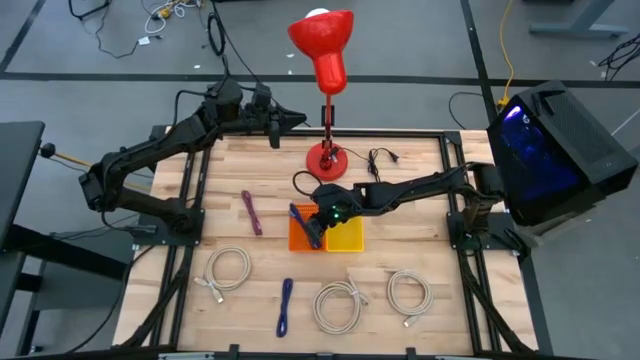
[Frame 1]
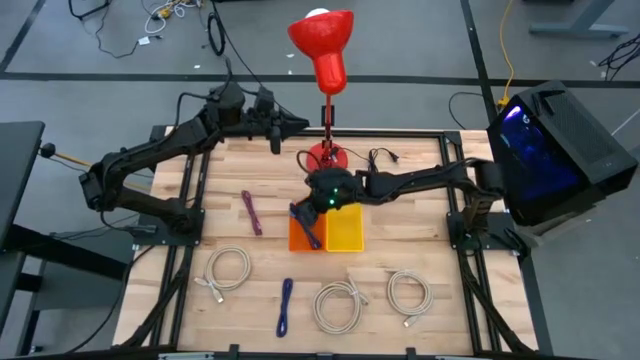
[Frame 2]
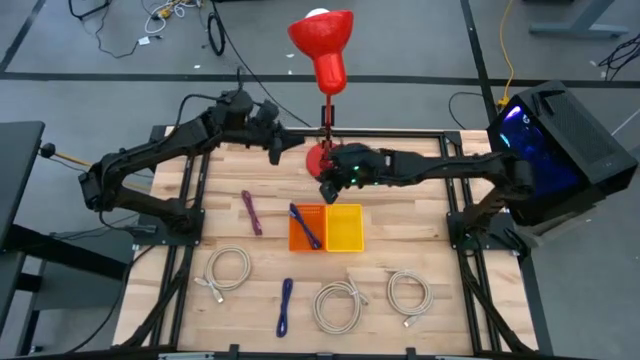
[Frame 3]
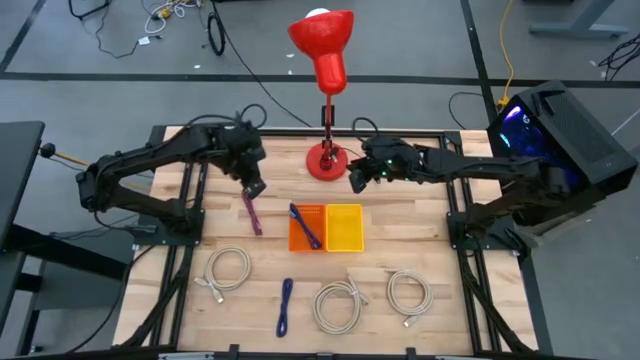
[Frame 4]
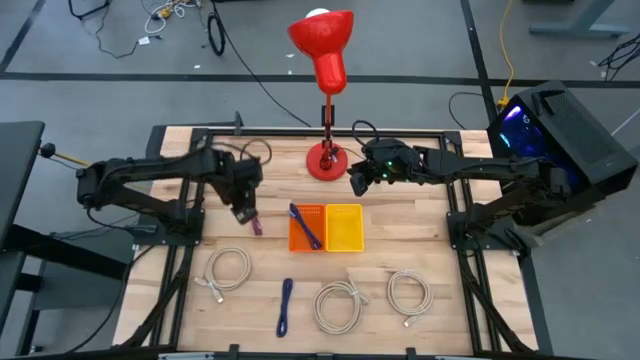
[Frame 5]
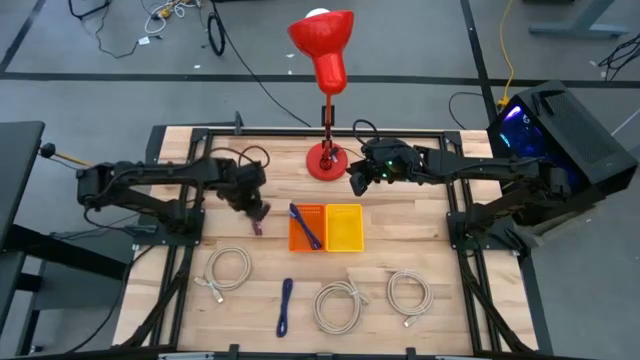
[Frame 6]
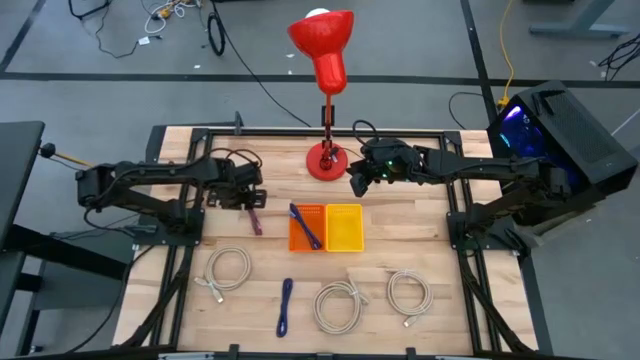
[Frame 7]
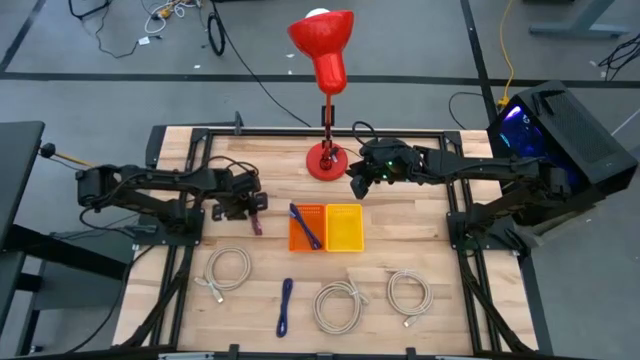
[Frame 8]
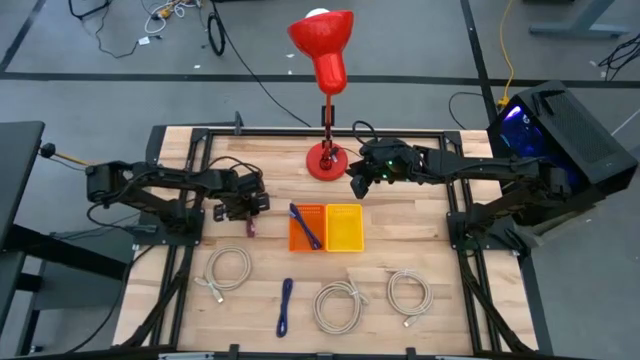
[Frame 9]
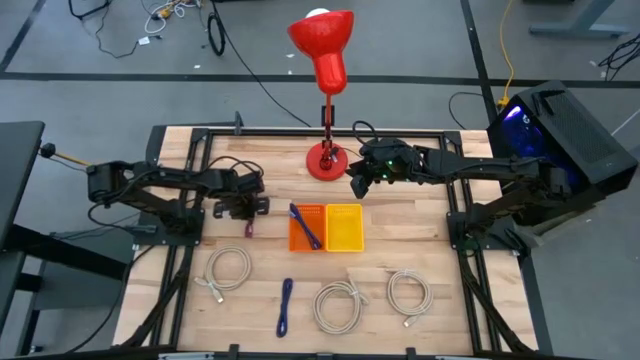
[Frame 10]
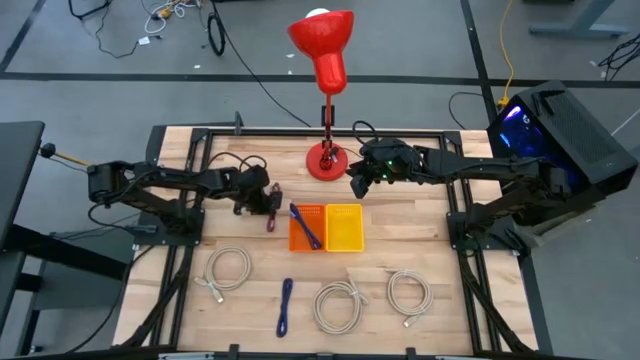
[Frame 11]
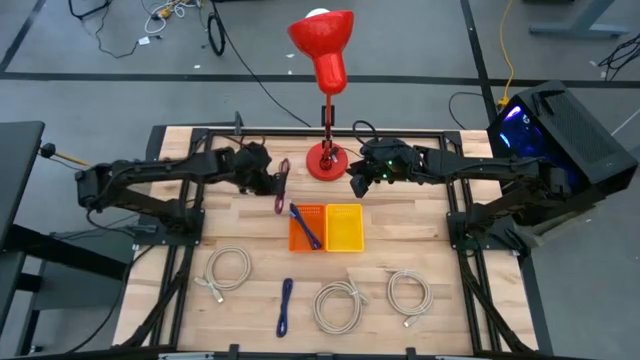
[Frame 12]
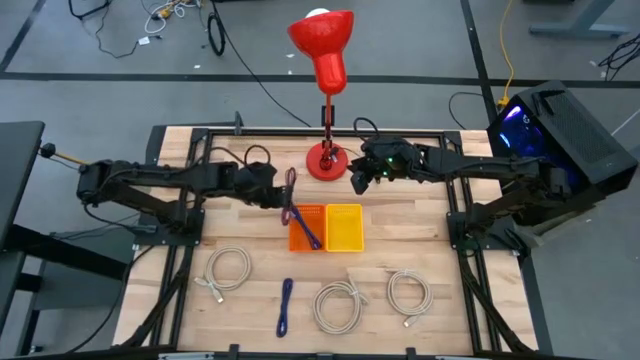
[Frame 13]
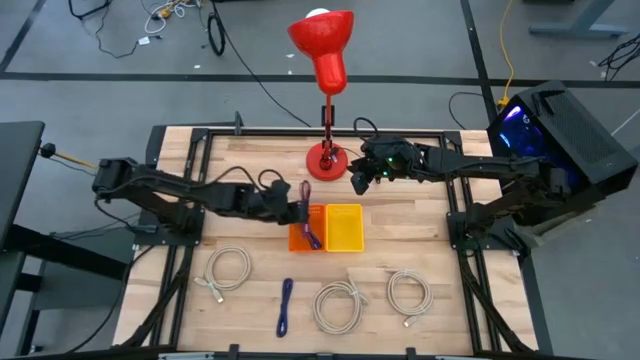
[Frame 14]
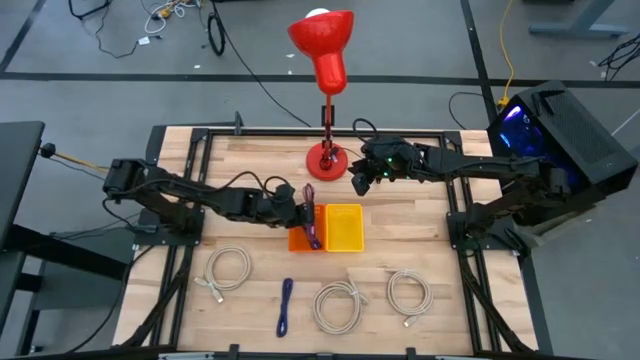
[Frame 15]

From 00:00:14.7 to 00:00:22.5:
Task: Pick & Place USB Port
Put the pink and black charger cable into the orange bin

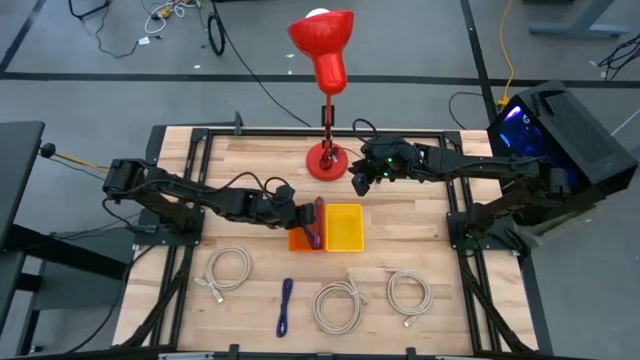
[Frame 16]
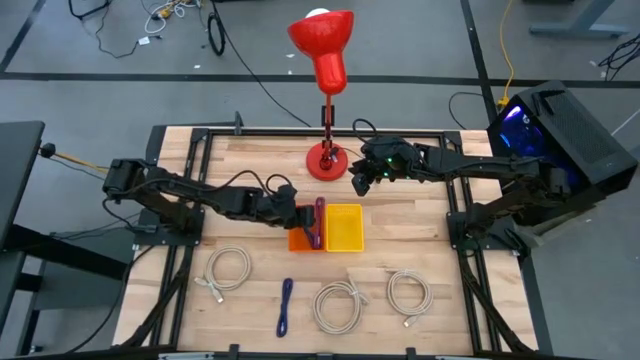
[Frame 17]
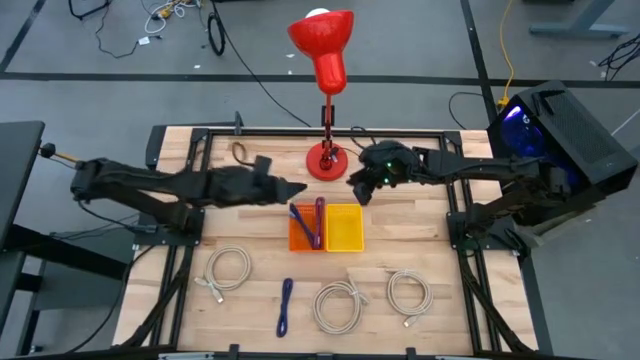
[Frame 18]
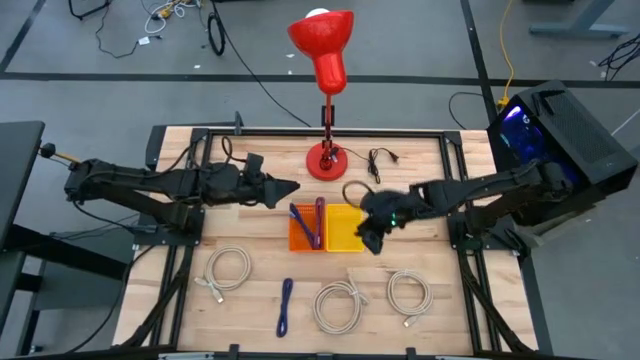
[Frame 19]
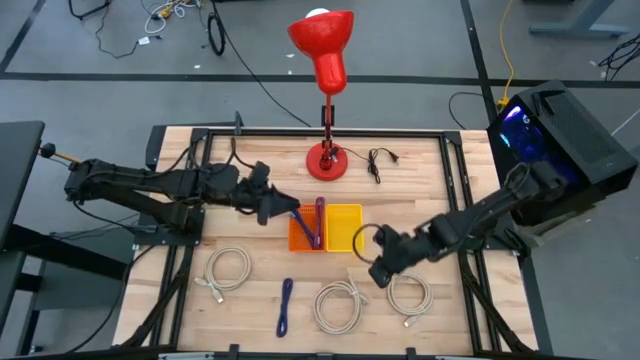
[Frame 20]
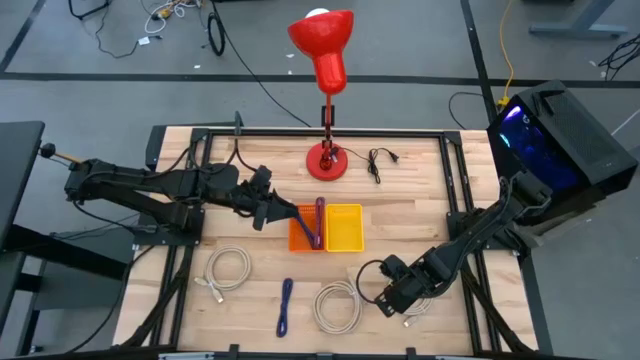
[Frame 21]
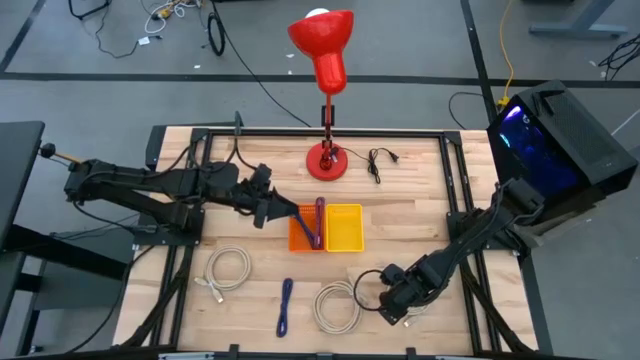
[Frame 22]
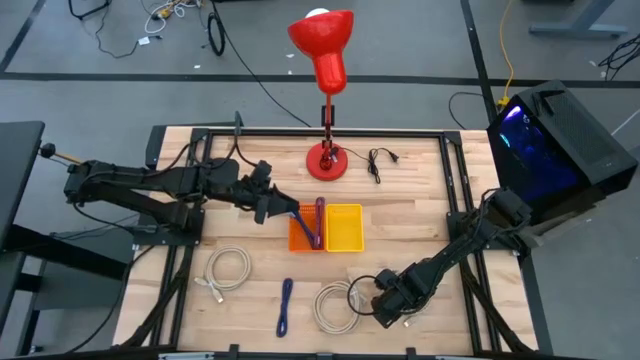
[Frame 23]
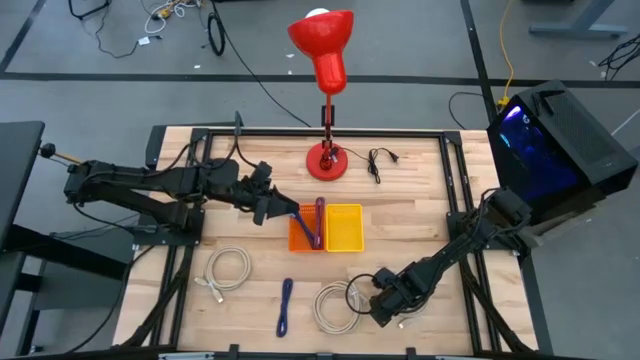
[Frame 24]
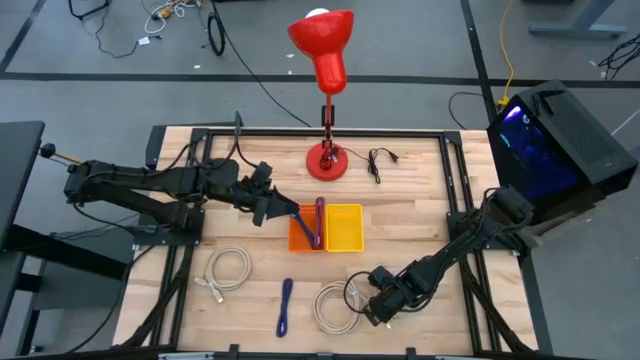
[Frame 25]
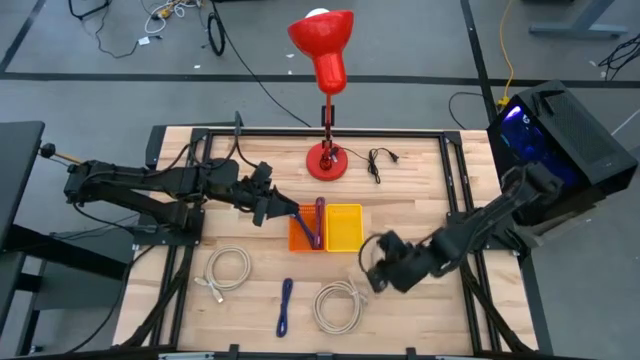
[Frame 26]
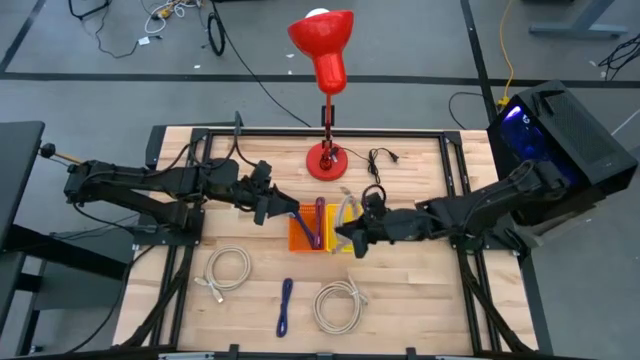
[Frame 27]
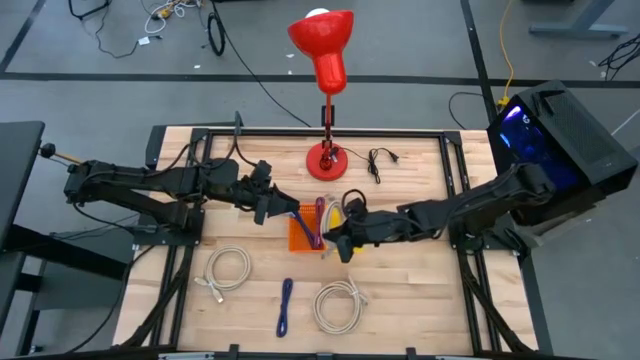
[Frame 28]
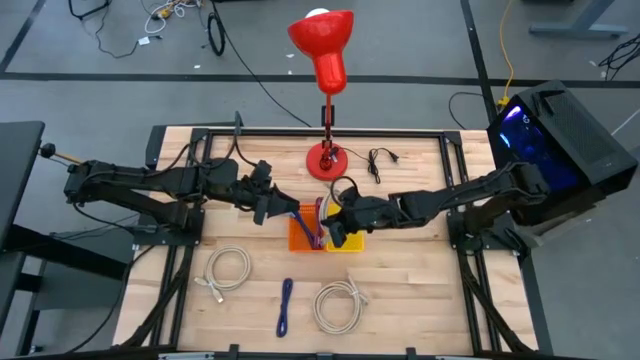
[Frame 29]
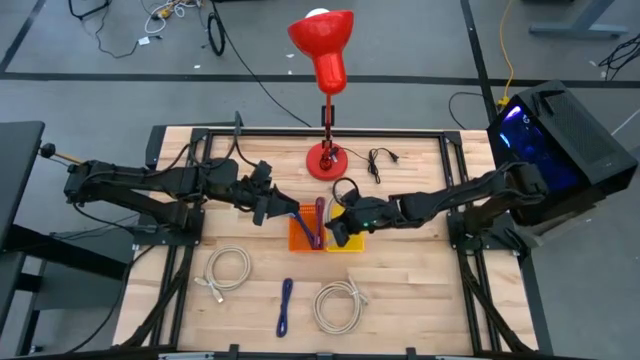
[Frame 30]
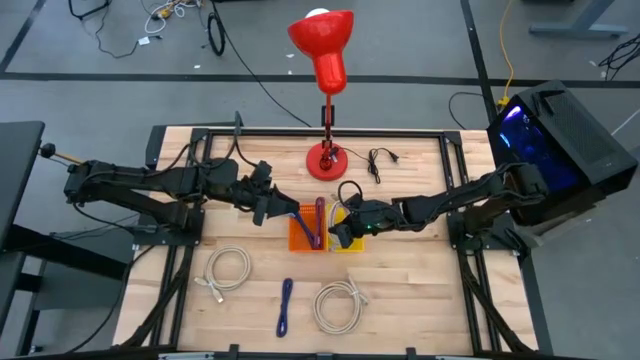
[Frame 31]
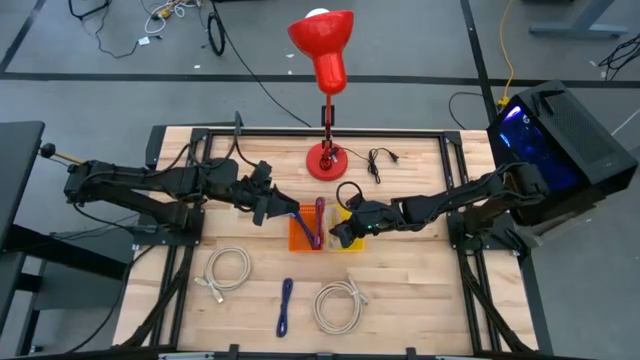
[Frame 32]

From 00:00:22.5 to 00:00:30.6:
Put the right brown HDMI cable into the yellow bin

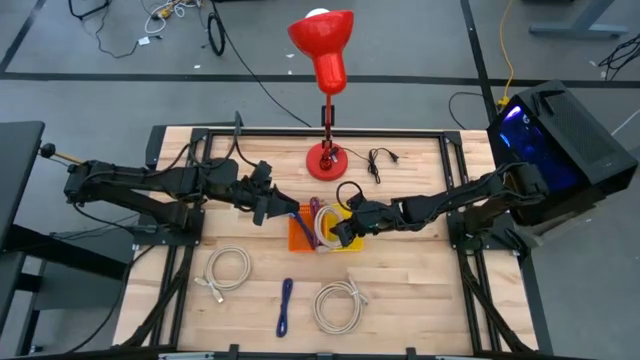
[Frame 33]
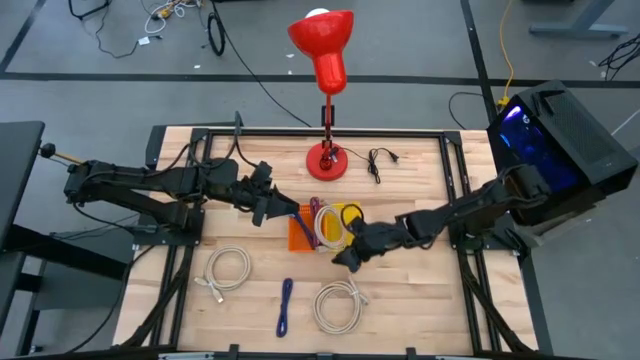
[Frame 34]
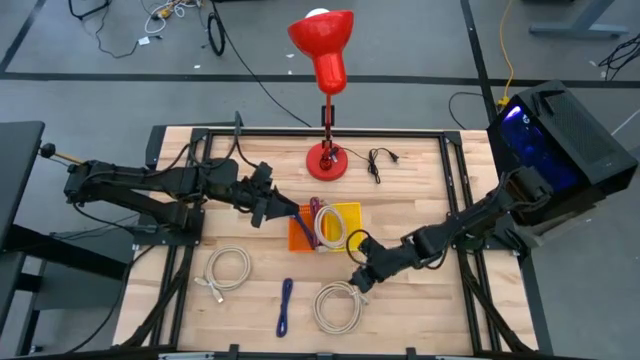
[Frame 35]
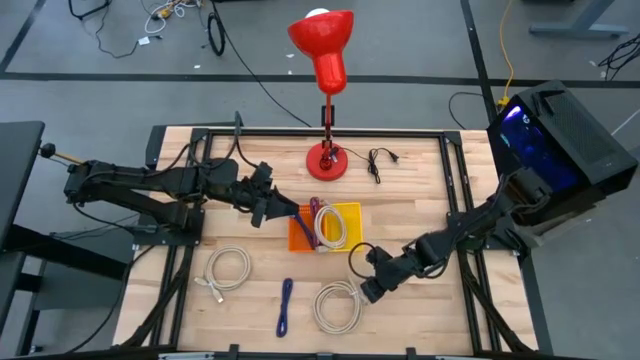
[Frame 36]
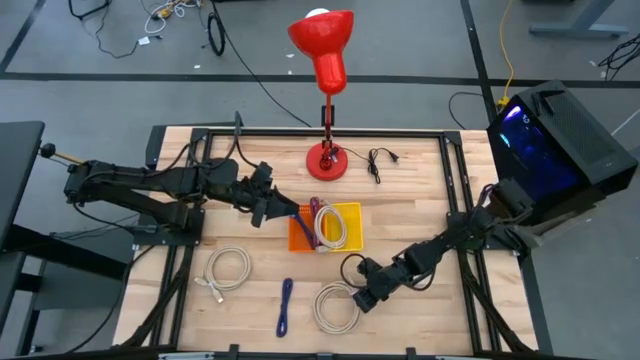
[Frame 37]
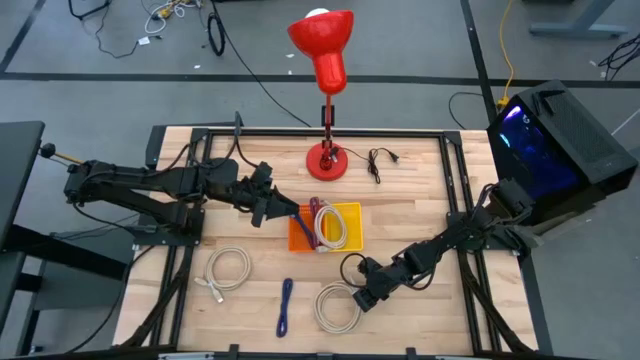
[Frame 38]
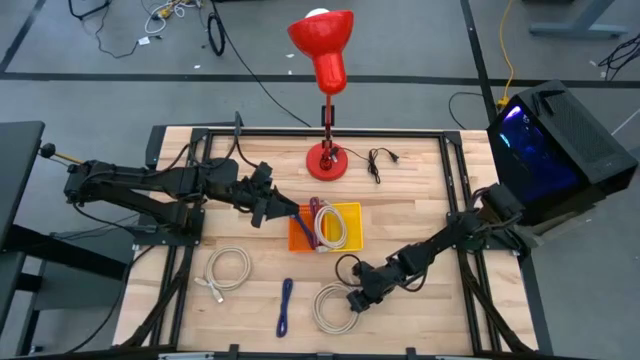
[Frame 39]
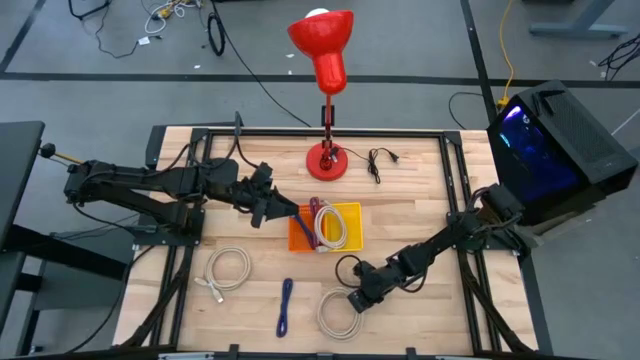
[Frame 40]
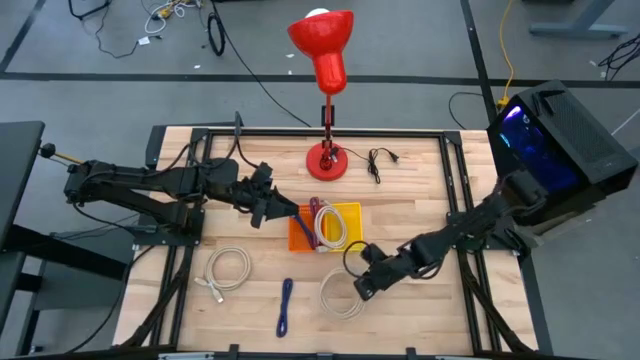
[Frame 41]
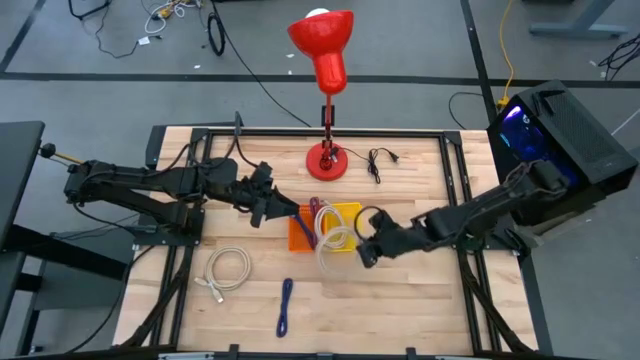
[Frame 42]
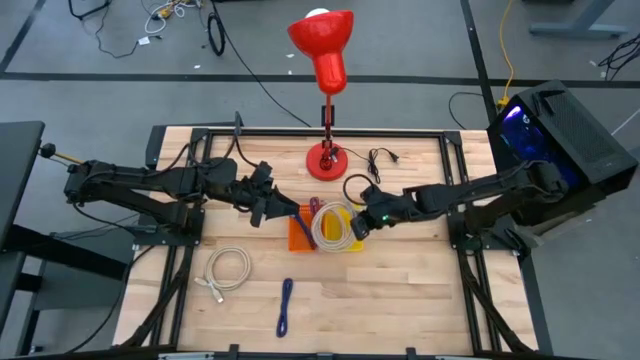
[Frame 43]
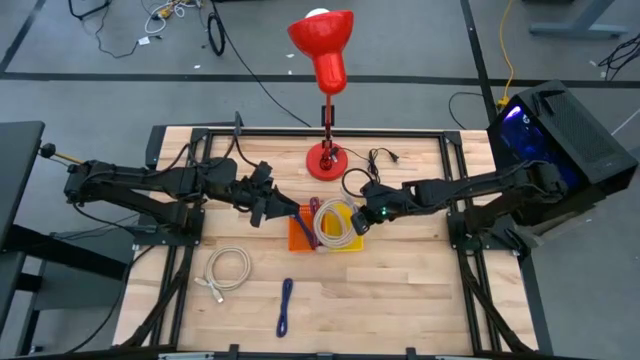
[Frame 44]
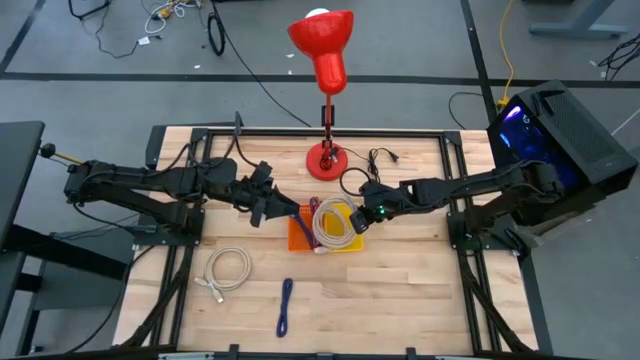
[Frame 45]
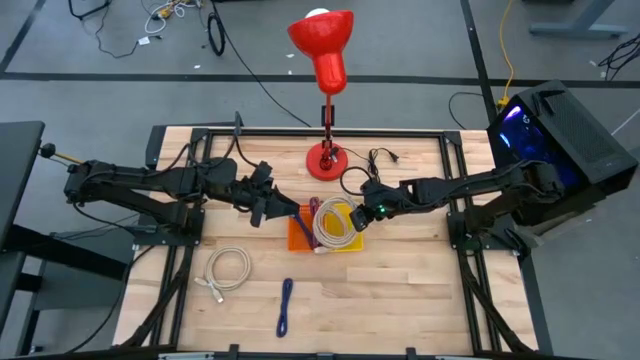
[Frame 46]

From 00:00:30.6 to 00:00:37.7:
Put the right brown HDMI cable into the yellow bin
